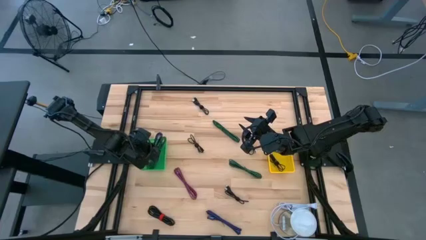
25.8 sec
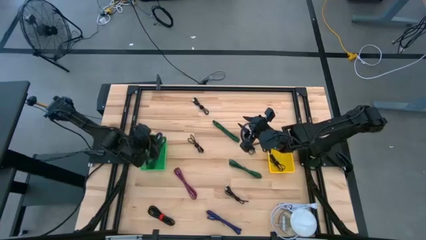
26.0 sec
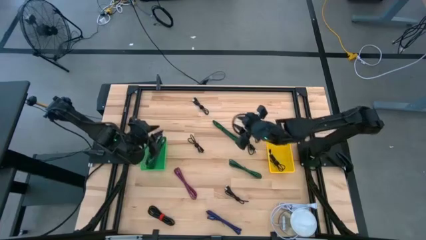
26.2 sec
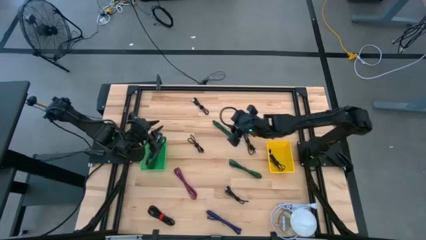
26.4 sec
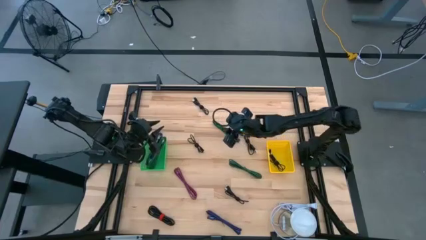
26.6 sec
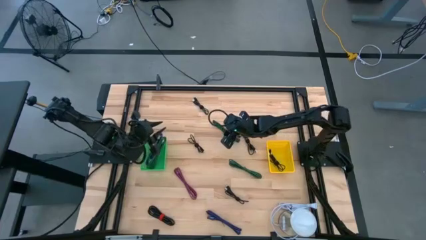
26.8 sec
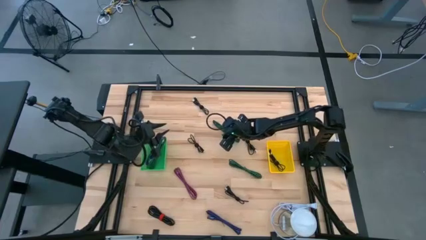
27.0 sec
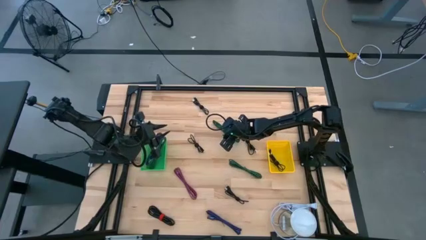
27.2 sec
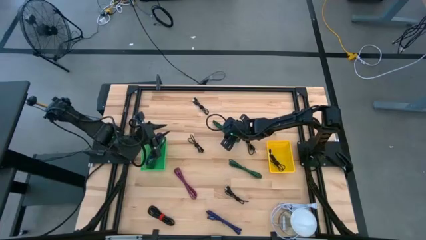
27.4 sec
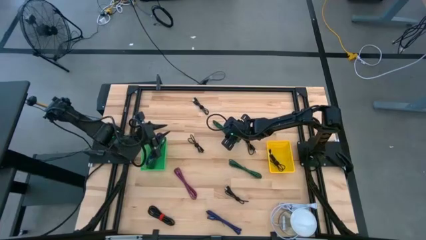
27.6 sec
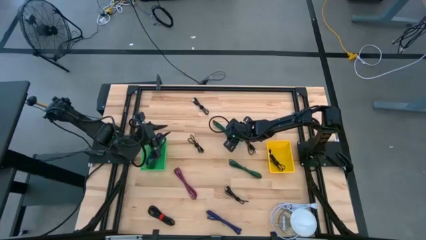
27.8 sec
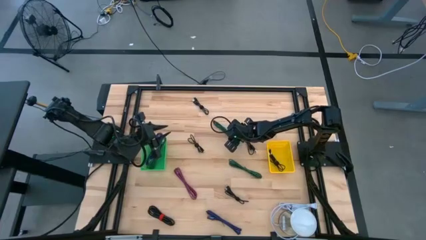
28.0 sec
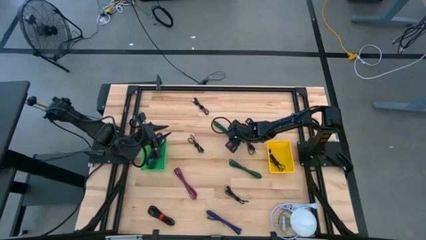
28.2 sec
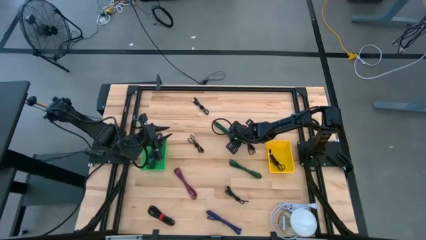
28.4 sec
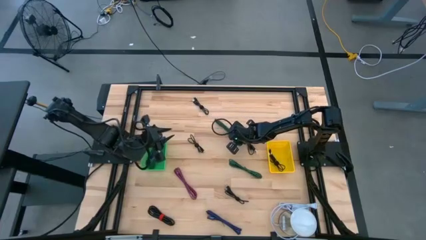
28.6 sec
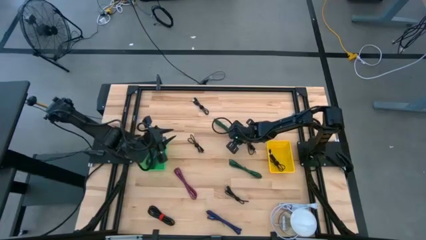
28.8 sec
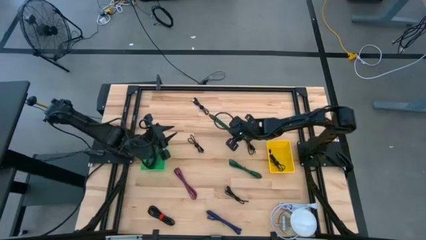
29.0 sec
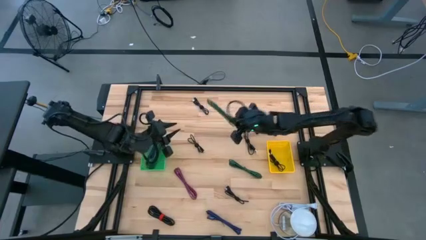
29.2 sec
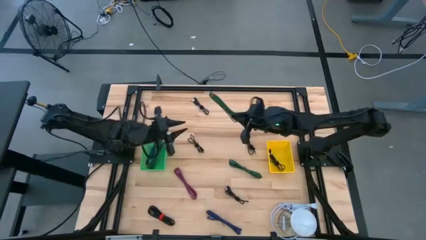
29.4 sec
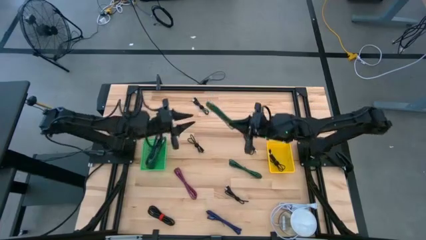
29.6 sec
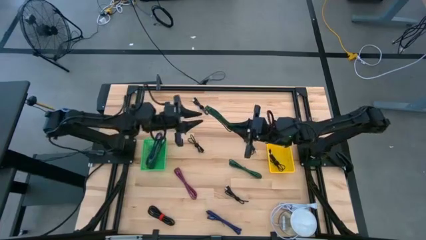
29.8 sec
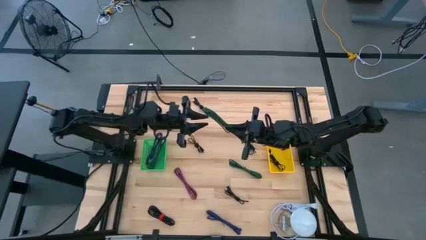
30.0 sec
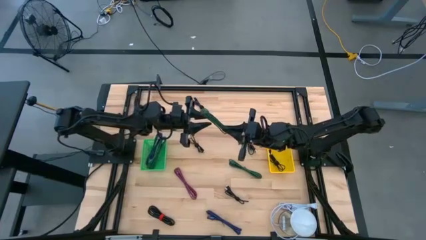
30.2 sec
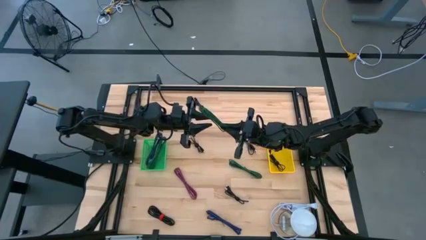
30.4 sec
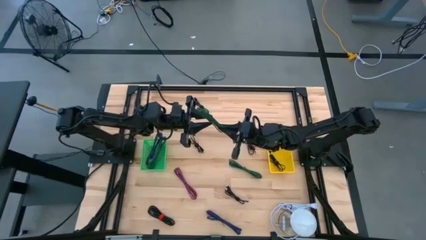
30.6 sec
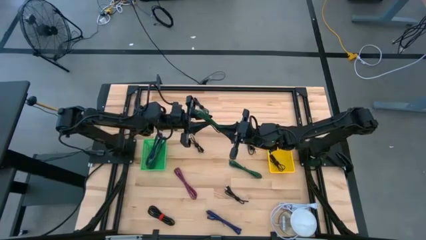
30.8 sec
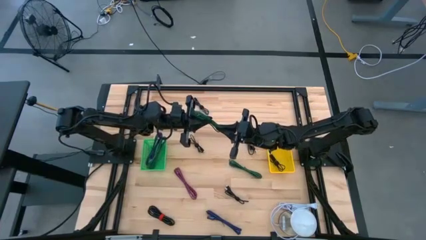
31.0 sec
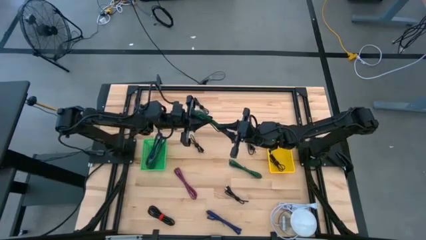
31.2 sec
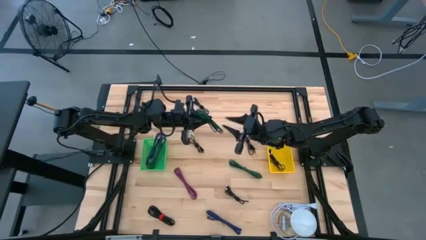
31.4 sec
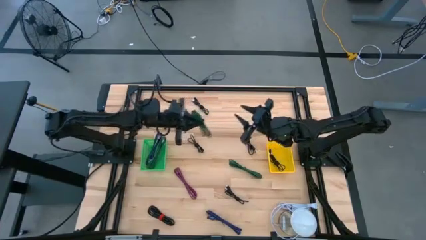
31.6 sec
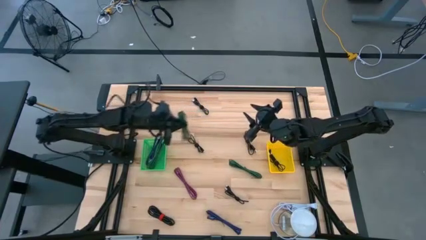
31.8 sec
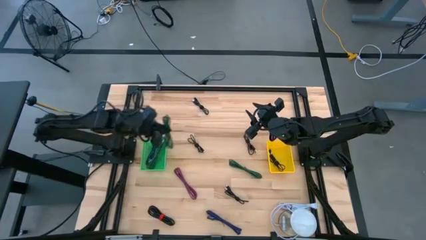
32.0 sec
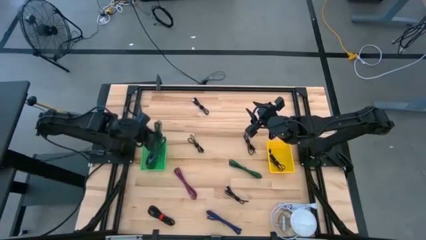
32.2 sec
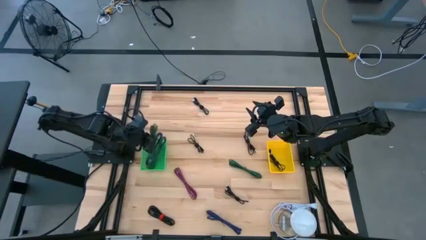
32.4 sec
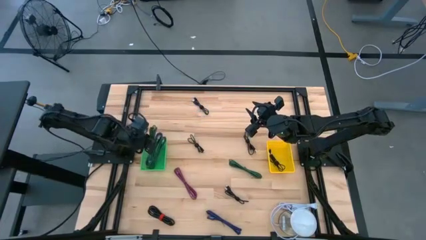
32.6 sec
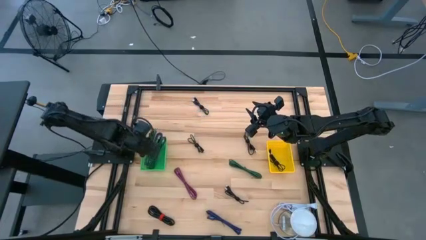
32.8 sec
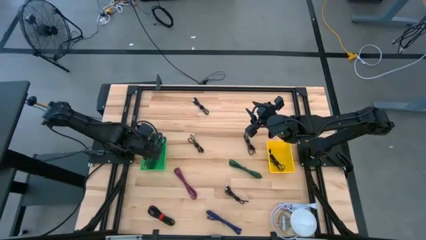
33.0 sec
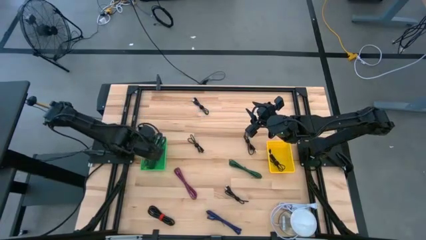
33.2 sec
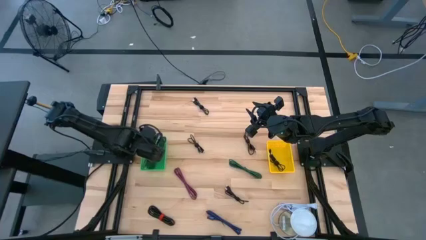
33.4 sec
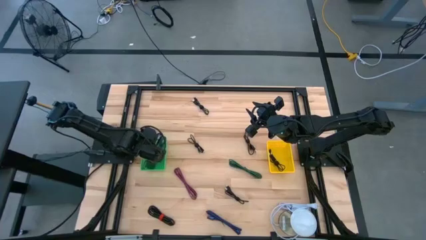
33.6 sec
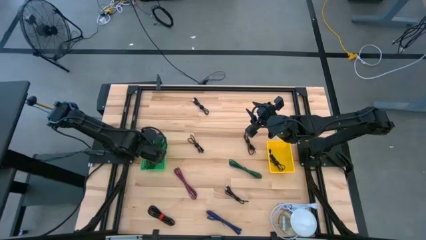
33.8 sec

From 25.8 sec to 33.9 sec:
Task: Pick & Place USB Port
Put the green black charger cable into the green bin

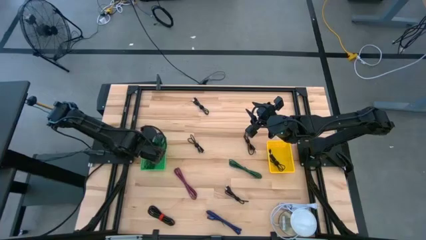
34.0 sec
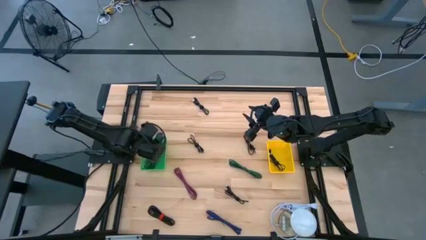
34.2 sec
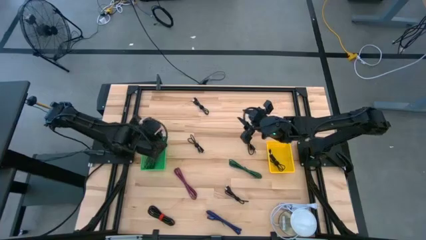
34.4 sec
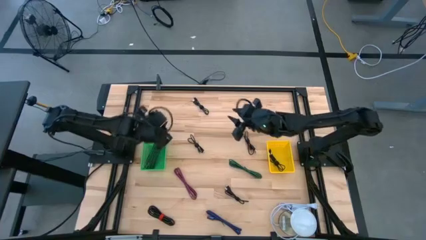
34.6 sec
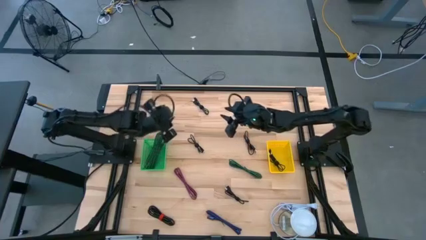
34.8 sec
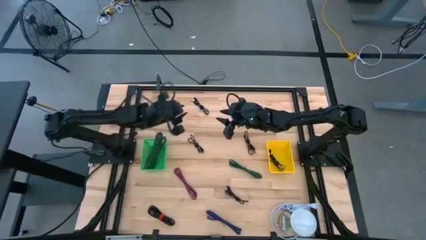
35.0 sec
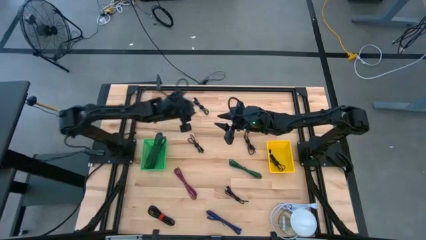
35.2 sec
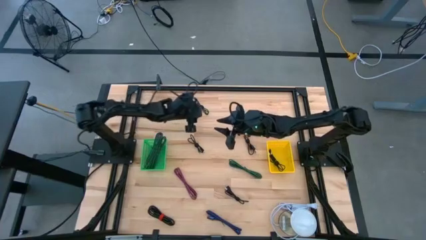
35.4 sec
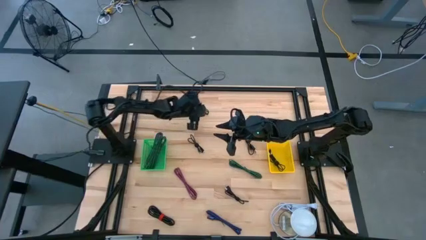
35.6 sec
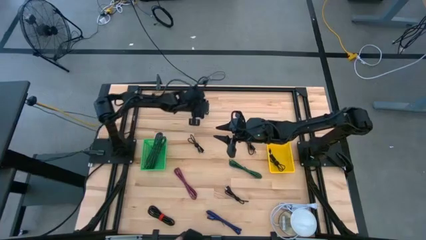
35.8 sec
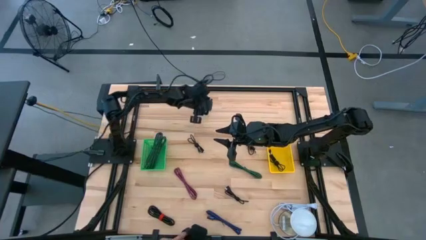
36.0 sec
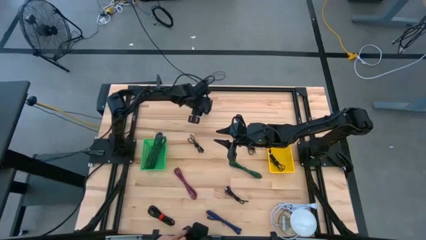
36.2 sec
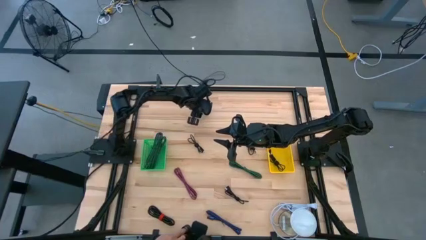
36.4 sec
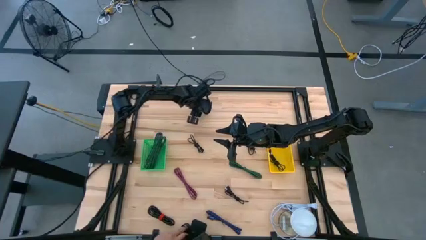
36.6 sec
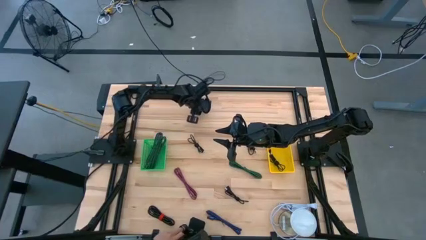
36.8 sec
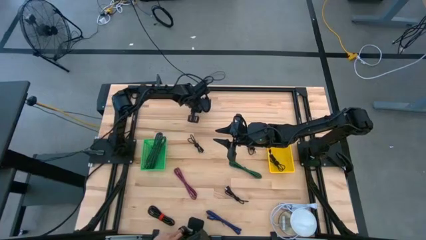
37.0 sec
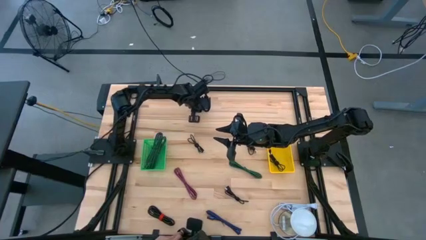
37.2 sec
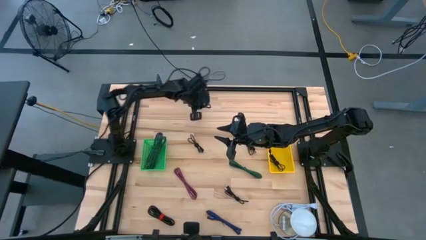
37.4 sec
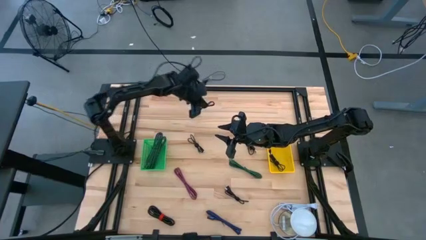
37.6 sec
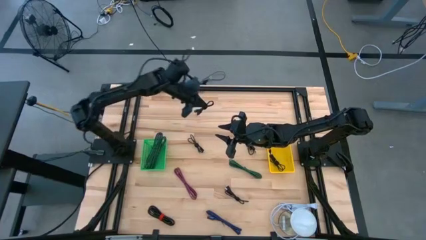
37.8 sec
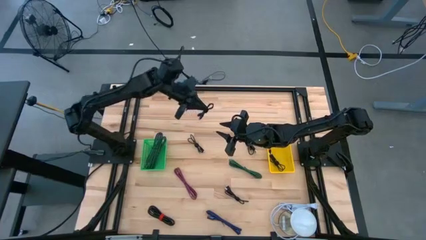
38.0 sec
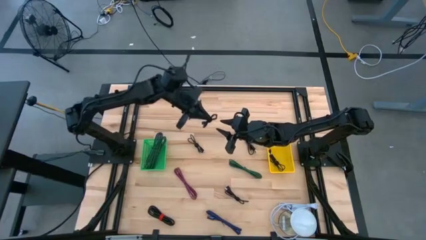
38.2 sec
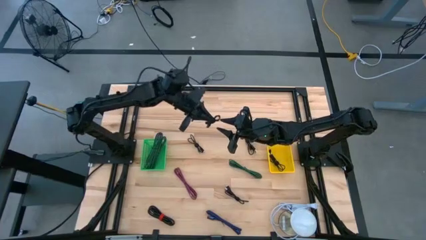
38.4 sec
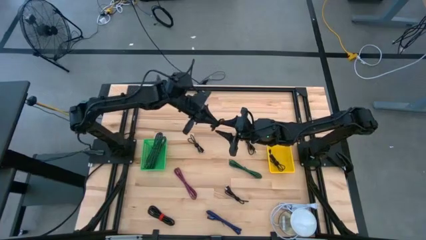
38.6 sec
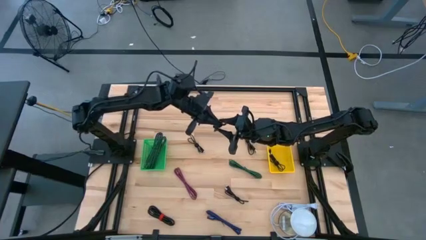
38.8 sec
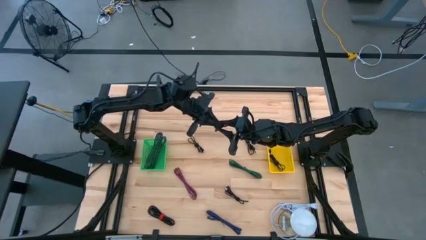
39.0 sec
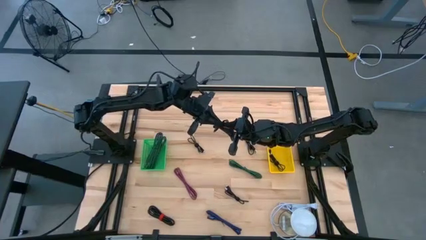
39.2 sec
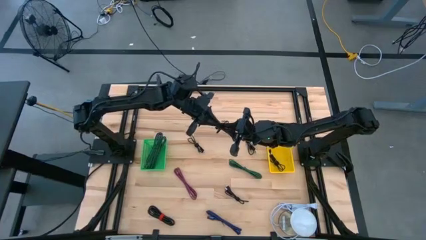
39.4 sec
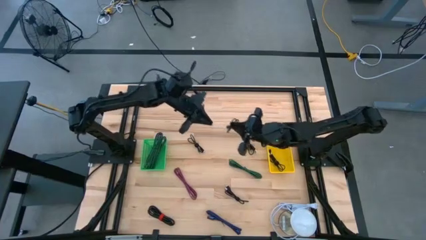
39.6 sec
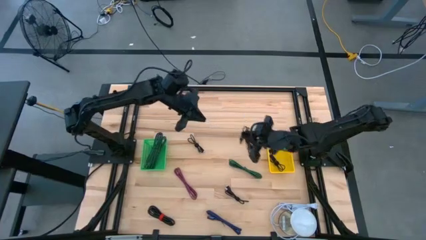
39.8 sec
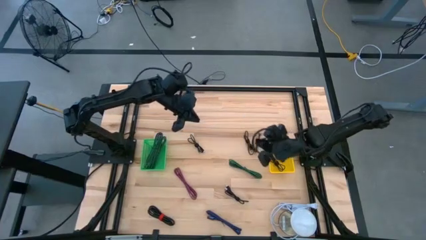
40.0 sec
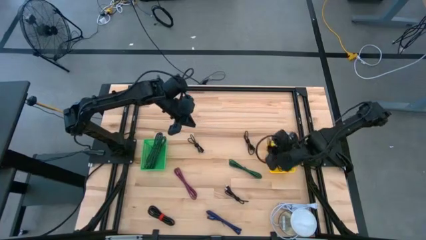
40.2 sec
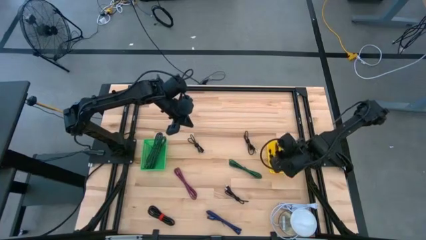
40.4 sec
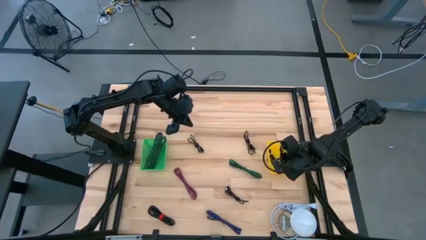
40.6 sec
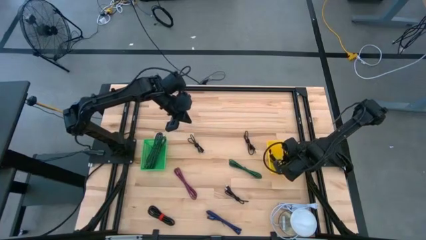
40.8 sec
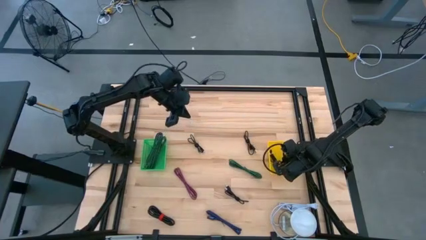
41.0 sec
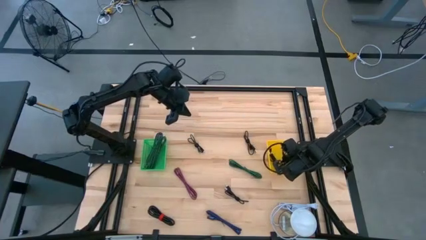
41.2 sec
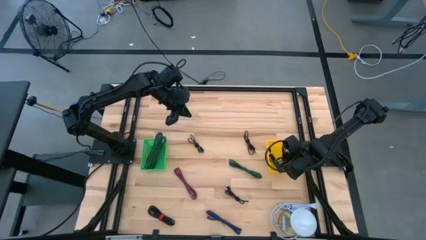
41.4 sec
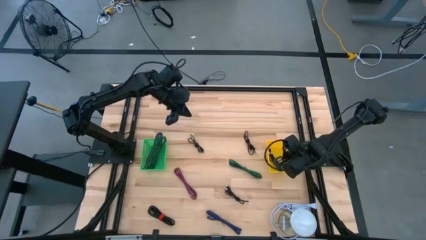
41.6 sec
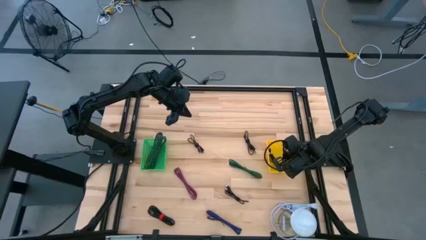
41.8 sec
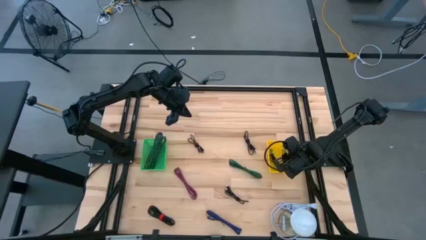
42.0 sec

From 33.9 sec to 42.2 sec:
Put the black charger cable into the yellow bin
